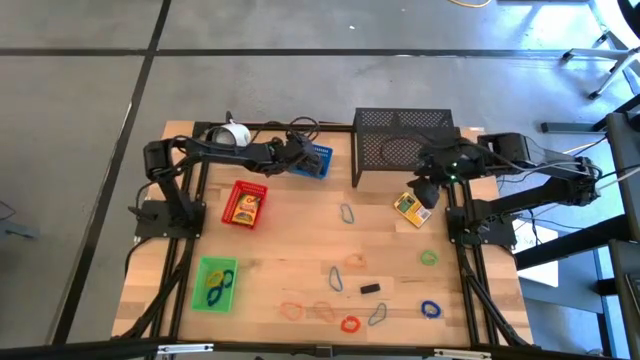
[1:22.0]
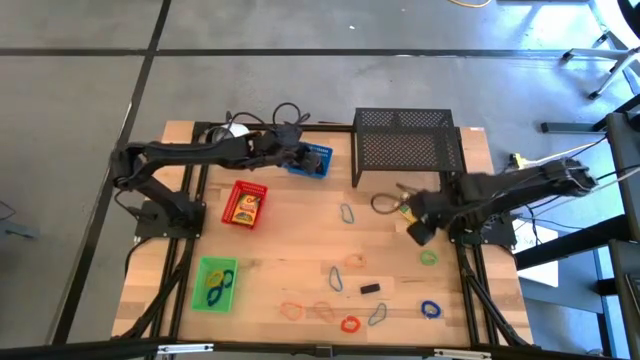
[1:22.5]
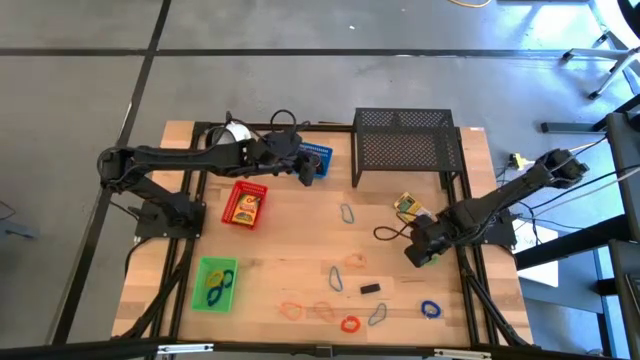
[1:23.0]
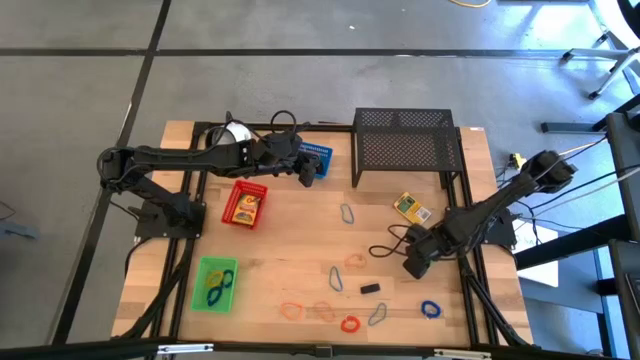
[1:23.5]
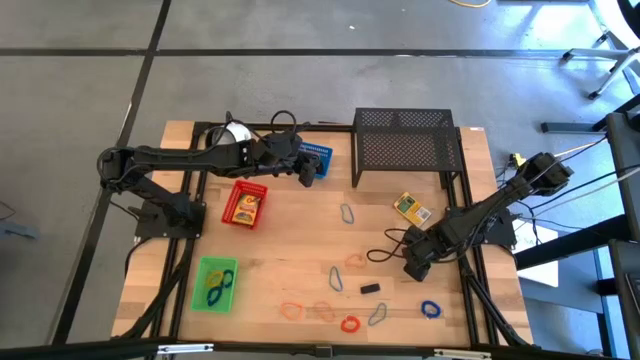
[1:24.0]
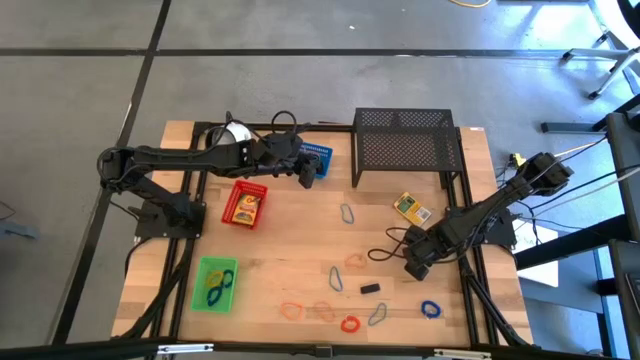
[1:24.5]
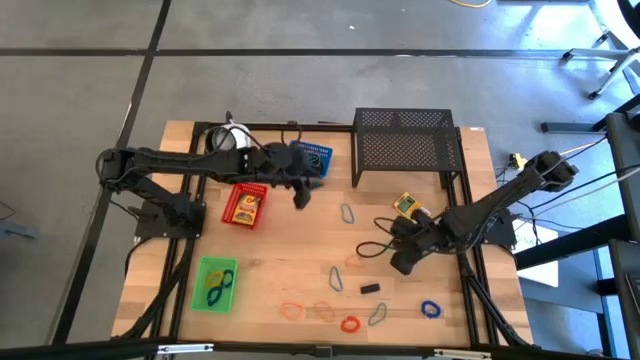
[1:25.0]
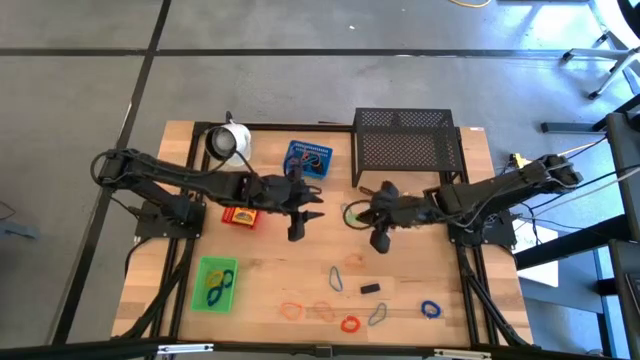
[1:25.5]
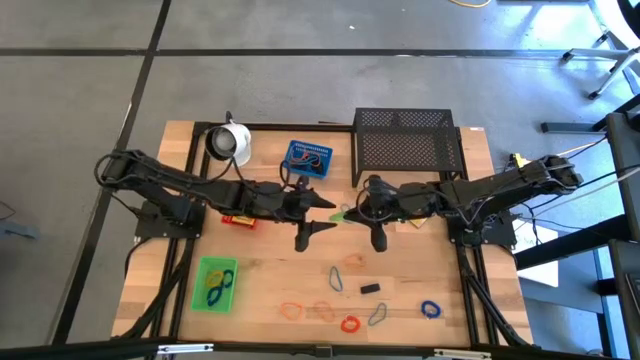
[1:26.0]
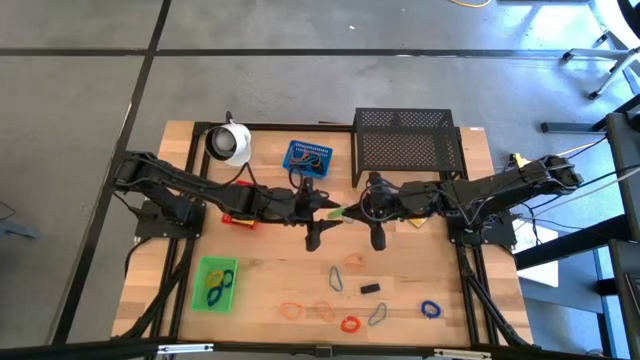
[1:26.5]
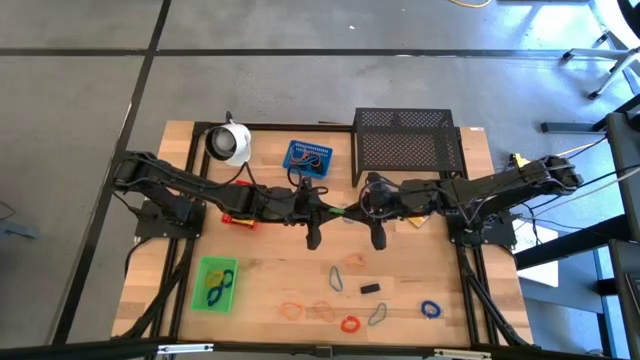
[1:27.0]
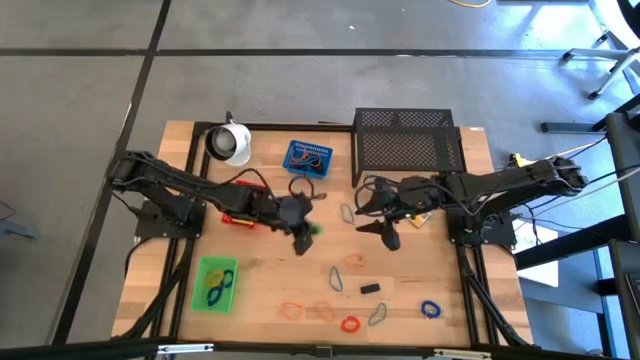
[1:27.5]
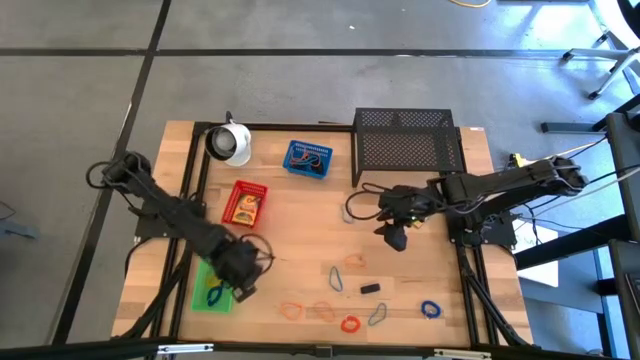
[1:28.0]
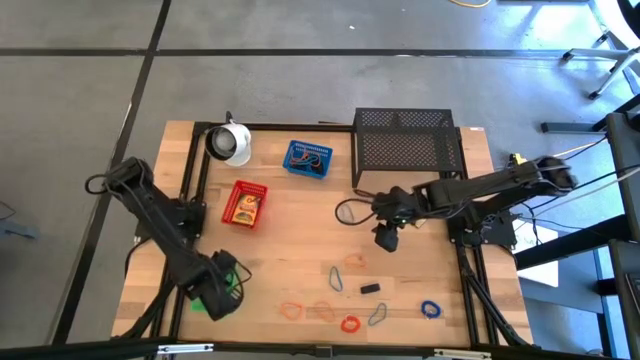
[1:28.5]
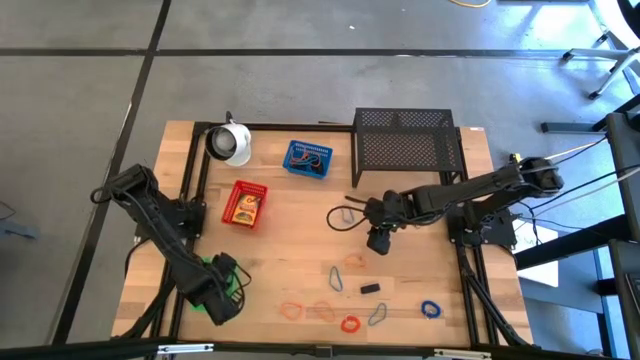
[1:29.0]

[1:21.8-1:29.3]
Task: Pick & Place Office Desk Supplies
Put the green spring keychain into the green bin

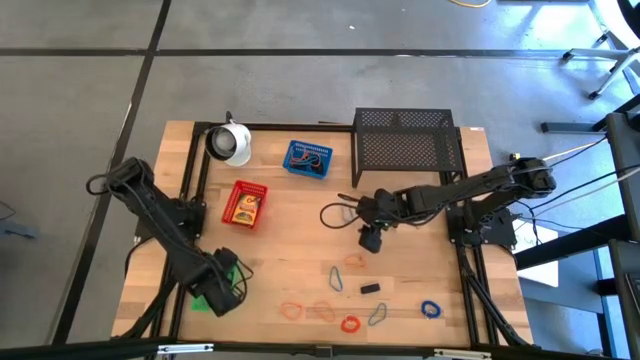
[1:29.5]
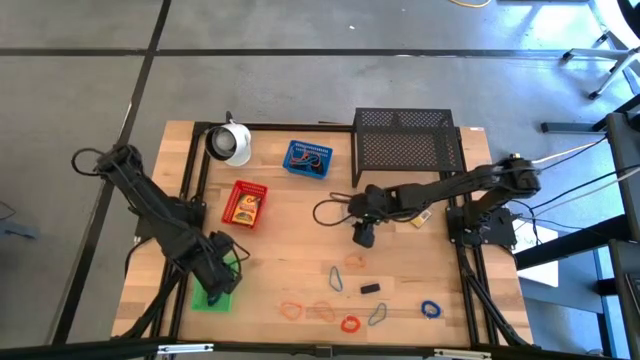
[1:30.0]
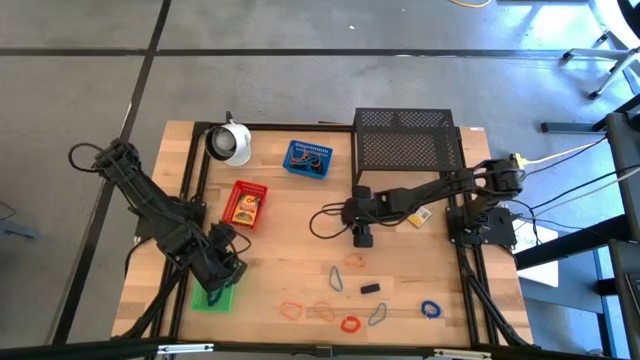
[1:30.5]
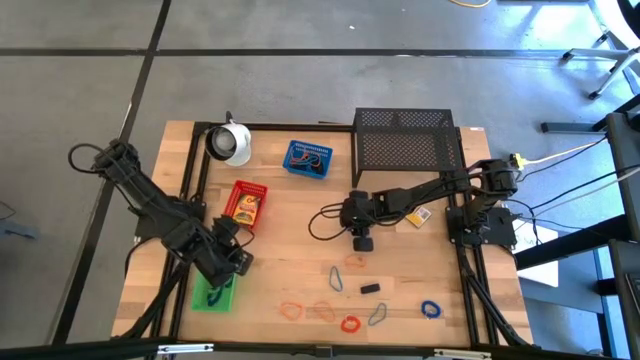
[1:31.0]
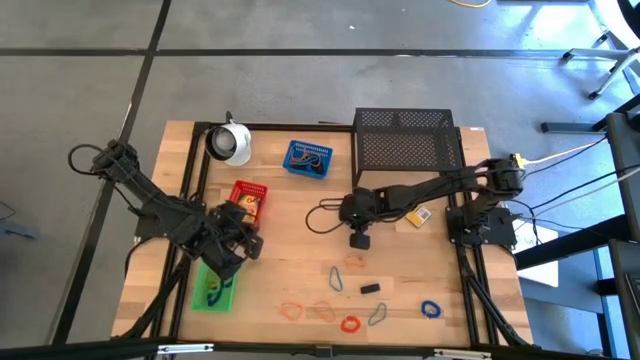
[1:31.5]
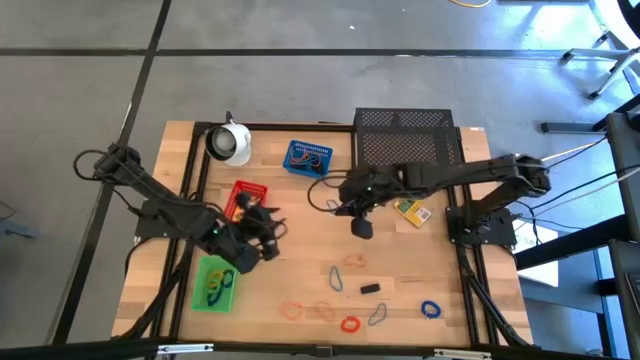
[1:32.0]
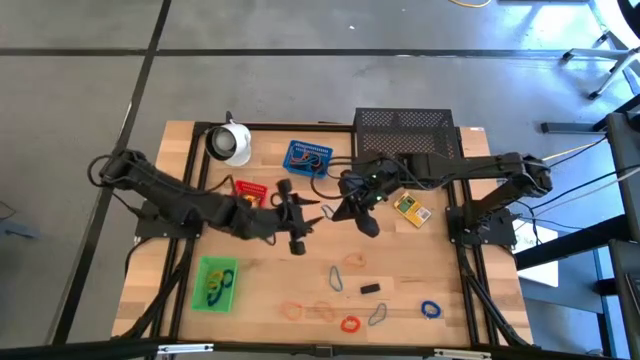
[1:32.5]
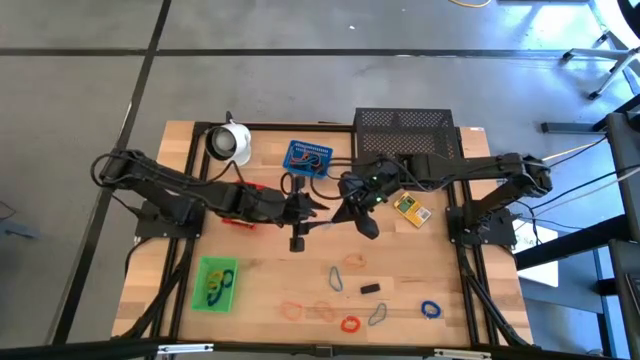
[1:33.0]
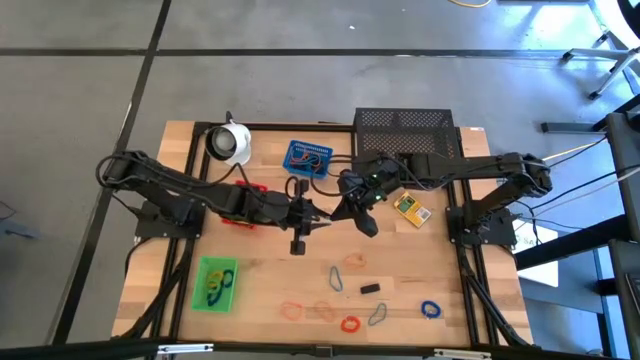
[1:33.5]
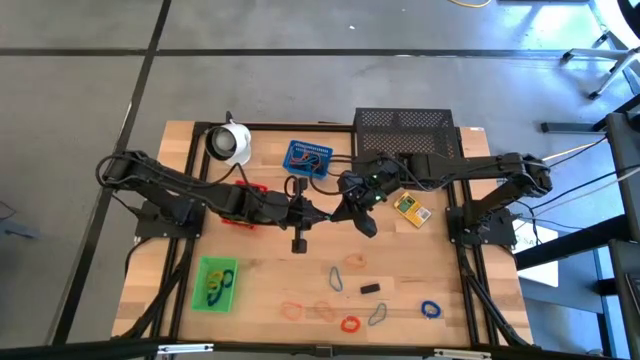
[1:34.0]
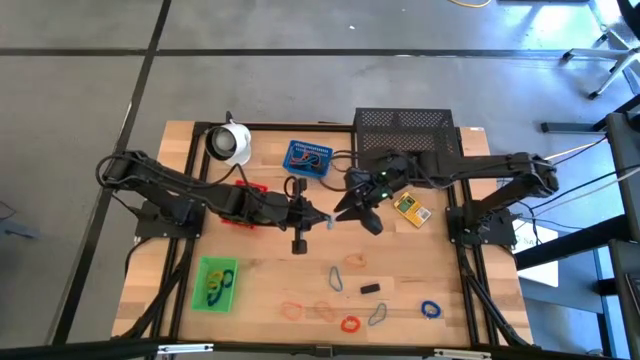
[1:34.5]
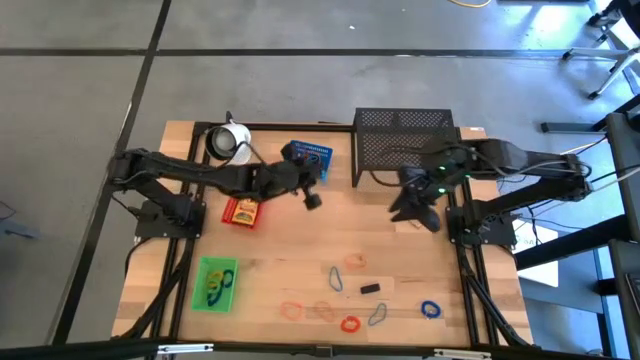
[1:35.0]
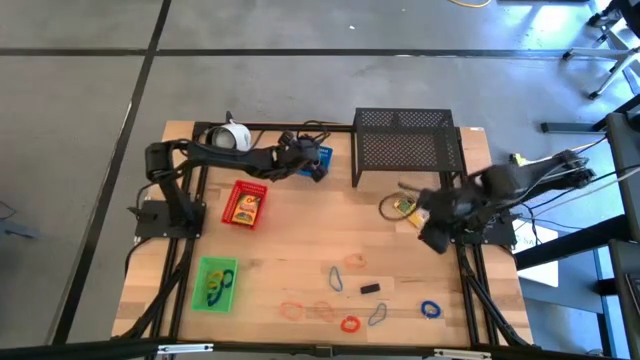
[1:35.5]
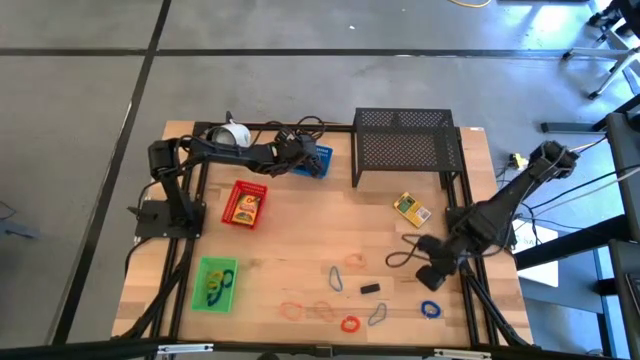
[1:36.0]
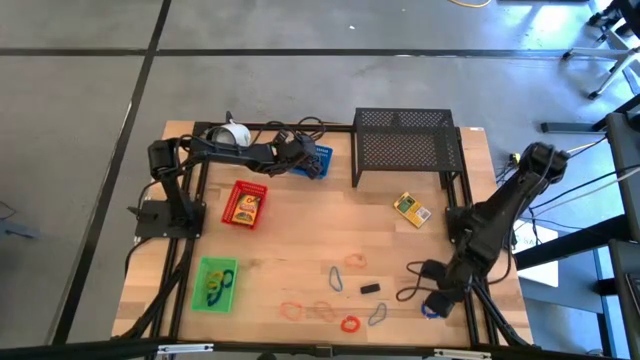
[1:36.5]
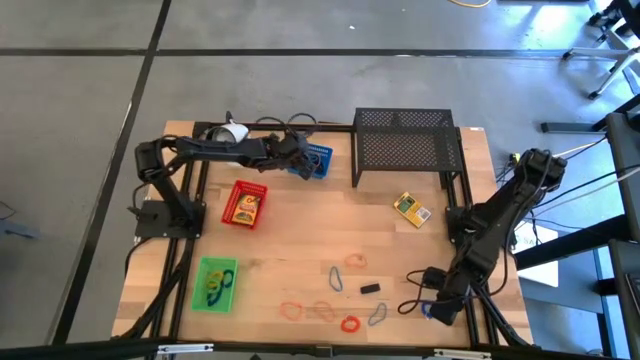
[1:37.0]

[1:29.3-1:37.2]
Put the blue rubber band into the blue bin

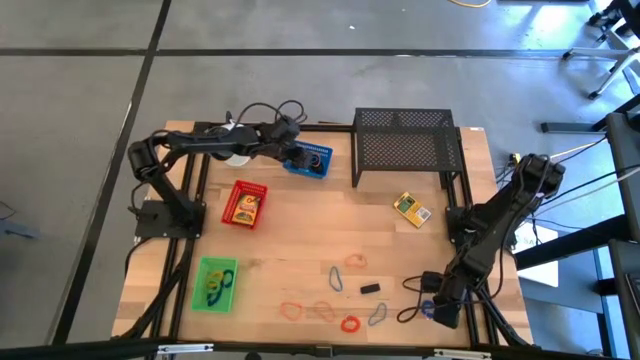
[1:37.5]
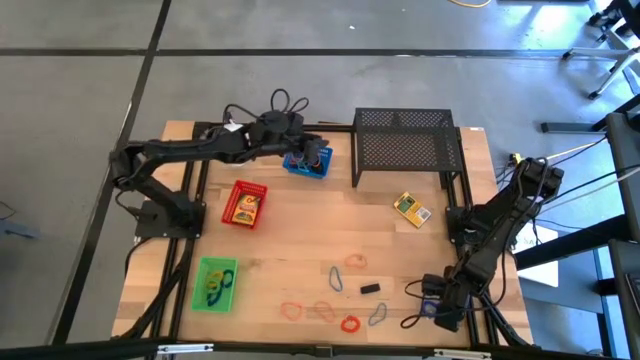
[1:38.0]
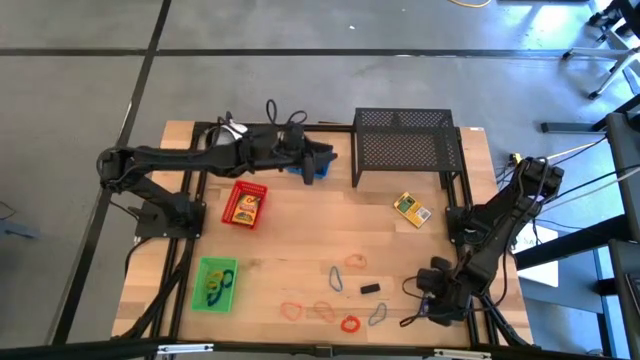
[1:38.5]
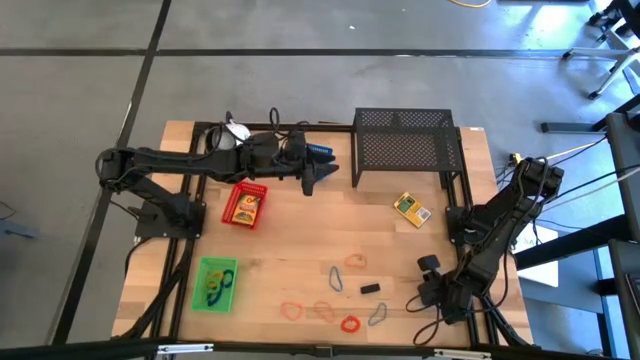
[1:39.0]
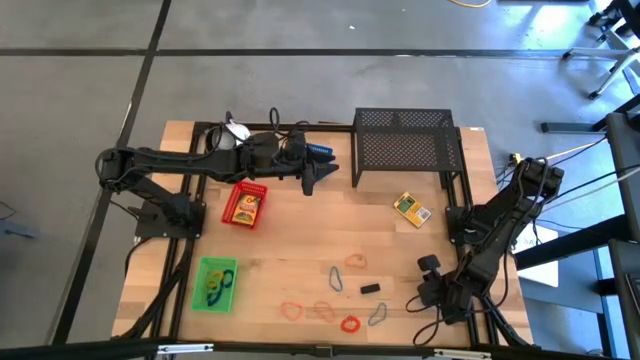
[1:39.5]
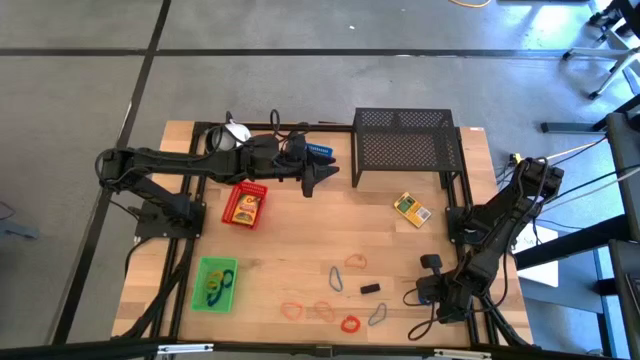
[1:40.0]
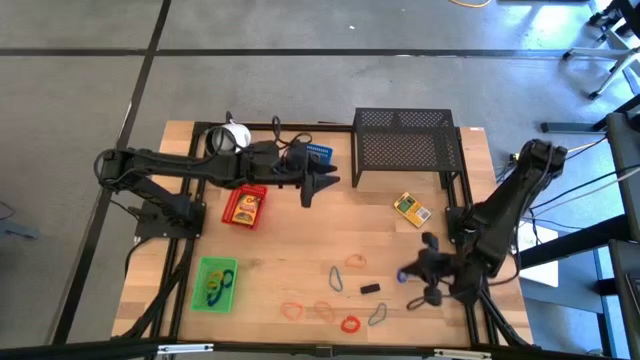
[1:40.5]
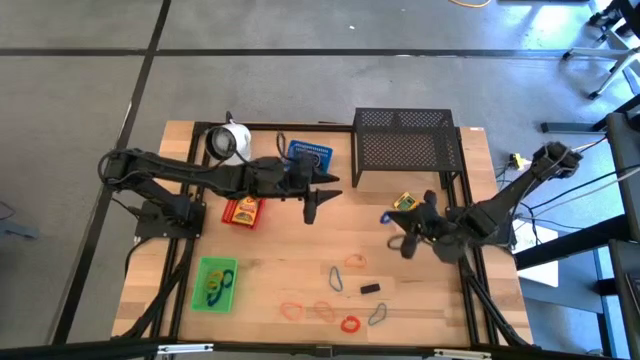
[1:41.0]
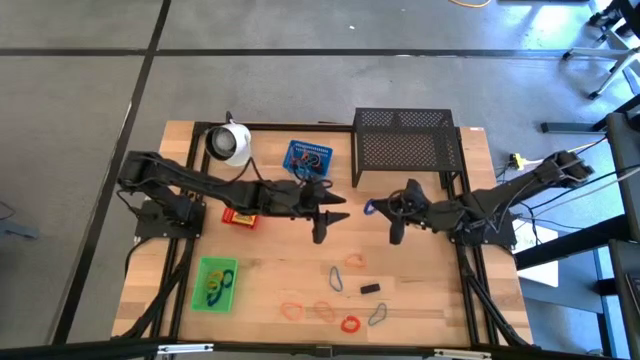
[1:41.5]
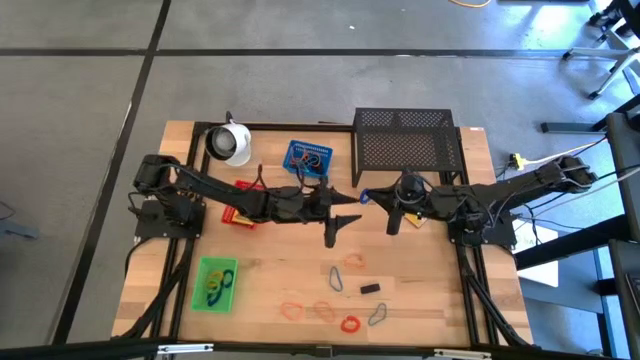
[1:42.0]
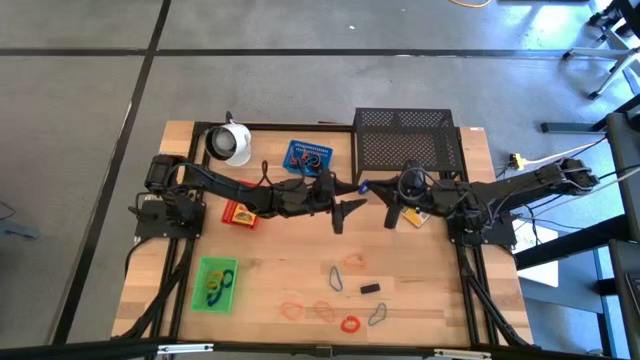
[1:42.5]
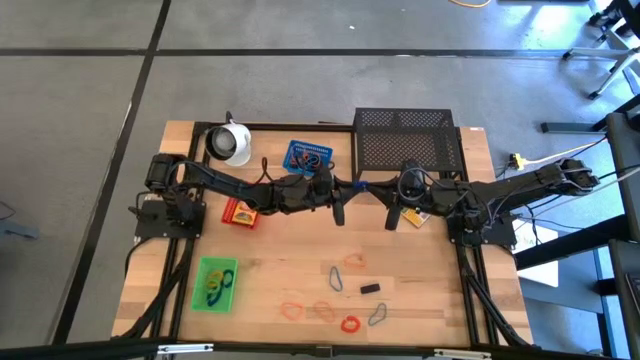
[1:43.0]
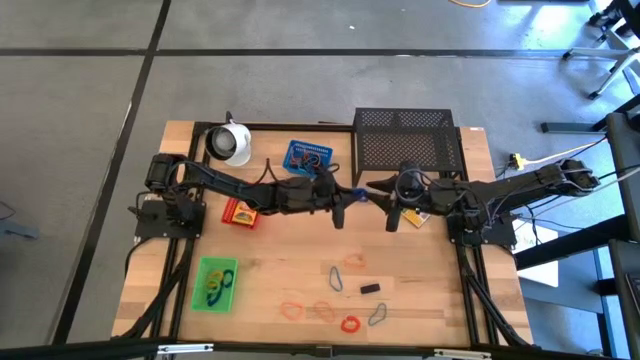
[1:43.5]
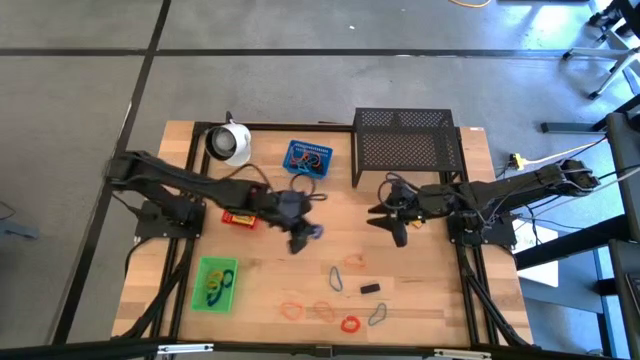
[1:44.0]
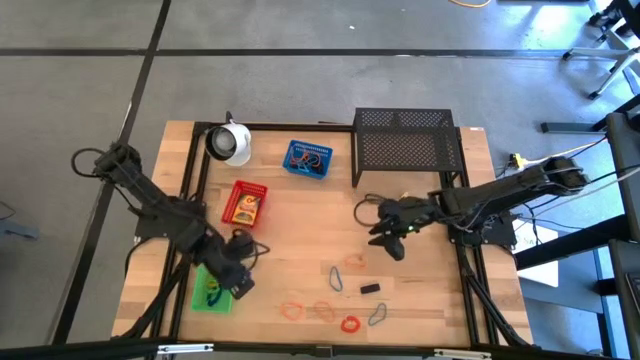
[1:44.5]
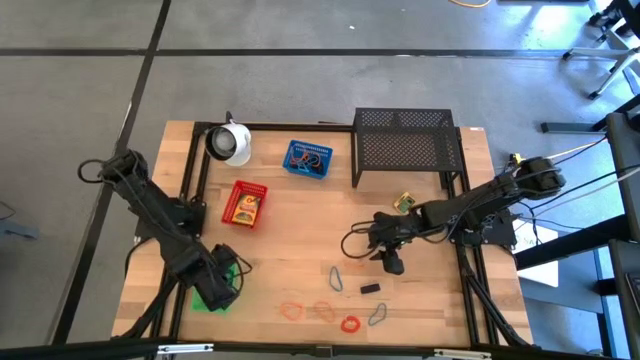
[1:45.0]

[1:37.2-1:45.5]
Put the blue spring keychain into the green bin
